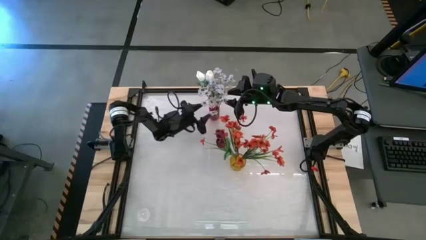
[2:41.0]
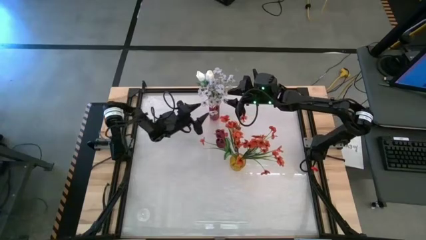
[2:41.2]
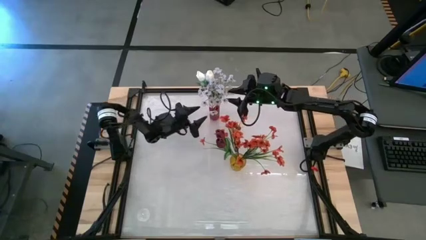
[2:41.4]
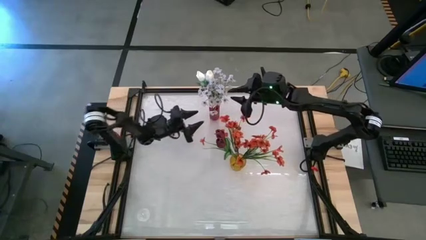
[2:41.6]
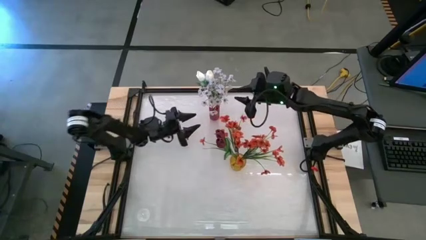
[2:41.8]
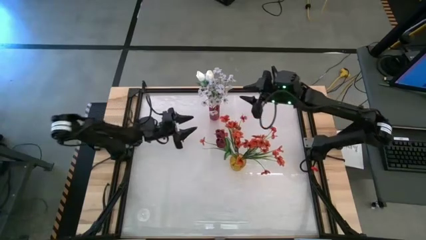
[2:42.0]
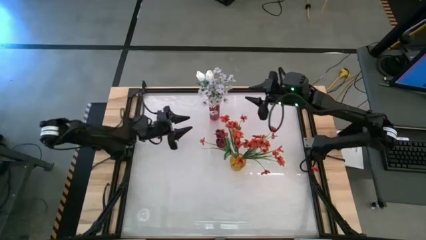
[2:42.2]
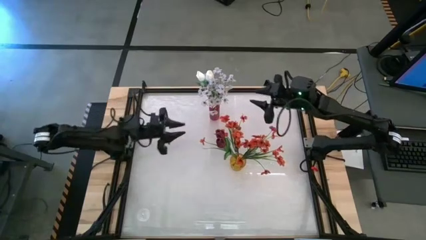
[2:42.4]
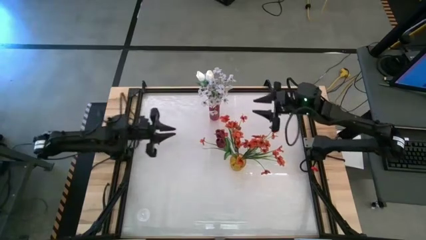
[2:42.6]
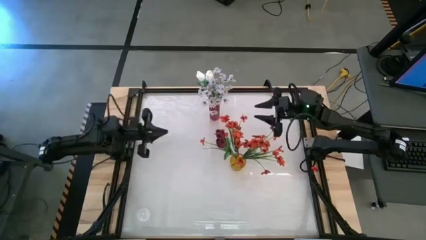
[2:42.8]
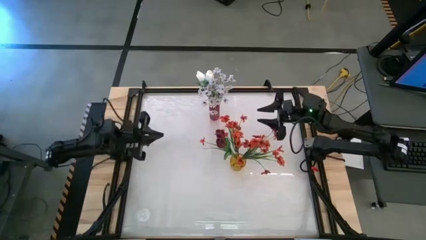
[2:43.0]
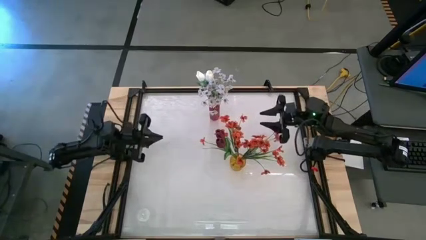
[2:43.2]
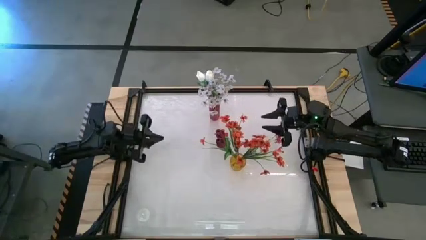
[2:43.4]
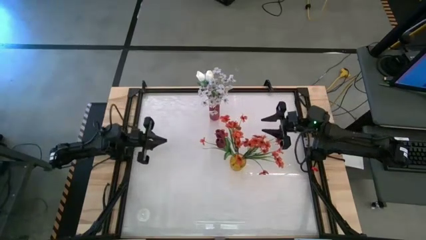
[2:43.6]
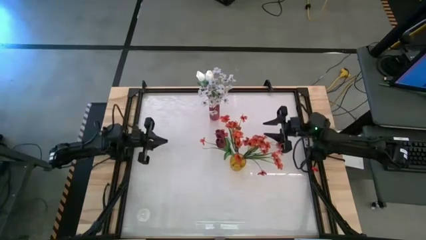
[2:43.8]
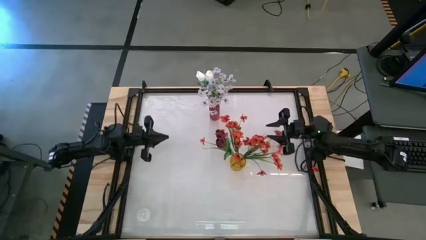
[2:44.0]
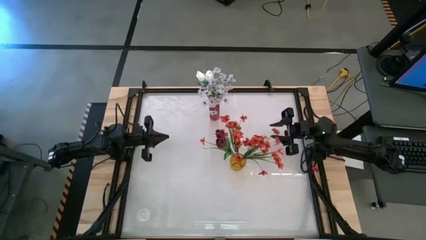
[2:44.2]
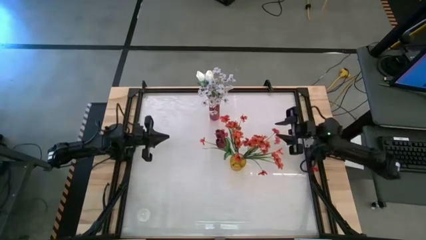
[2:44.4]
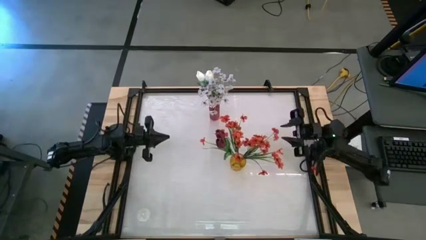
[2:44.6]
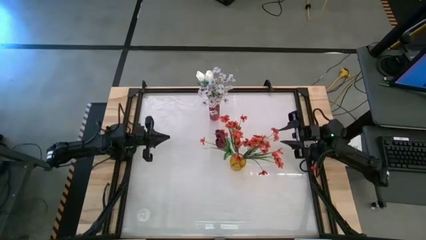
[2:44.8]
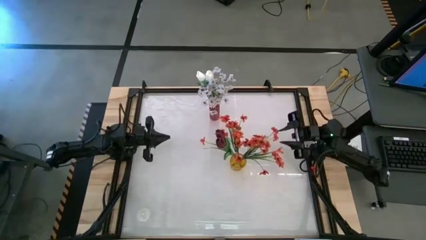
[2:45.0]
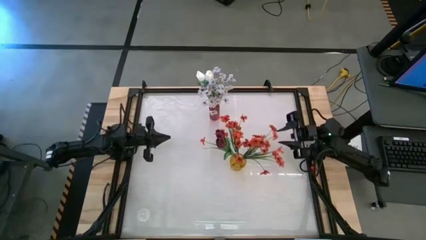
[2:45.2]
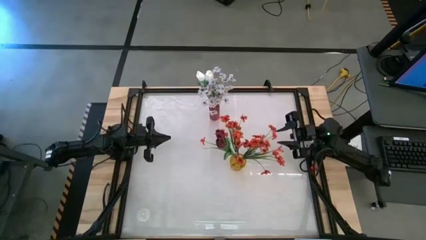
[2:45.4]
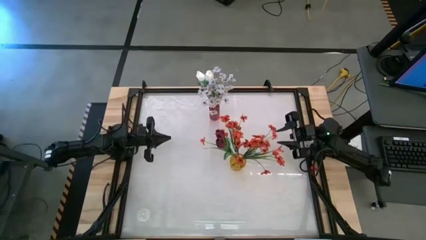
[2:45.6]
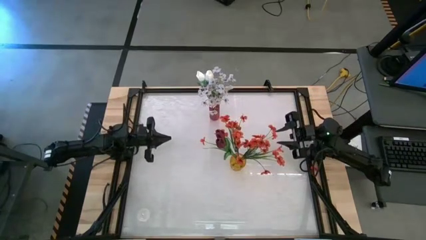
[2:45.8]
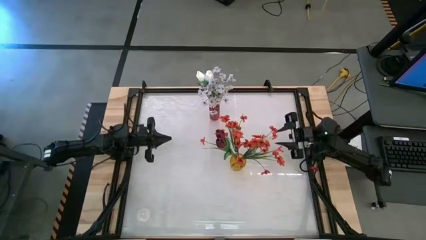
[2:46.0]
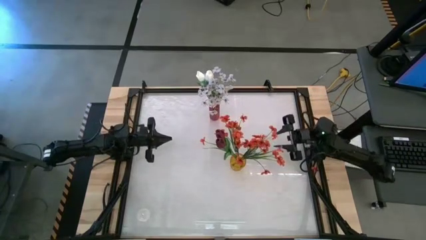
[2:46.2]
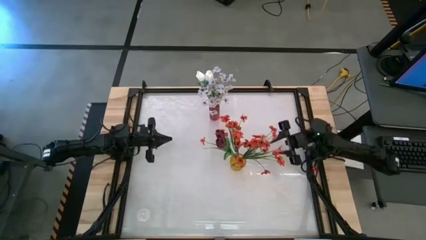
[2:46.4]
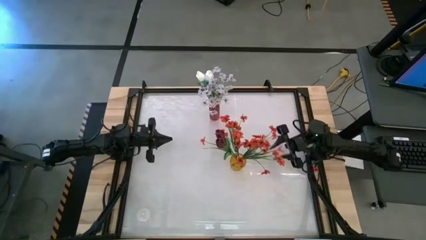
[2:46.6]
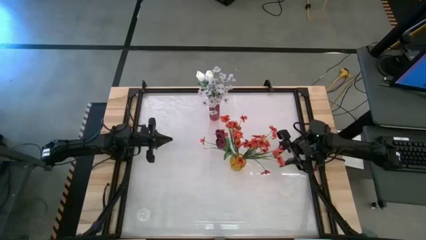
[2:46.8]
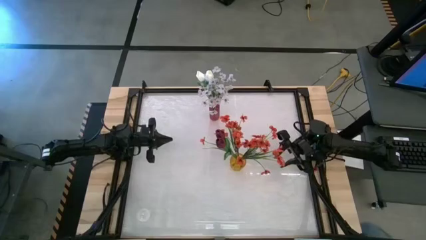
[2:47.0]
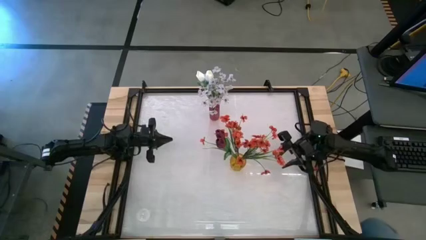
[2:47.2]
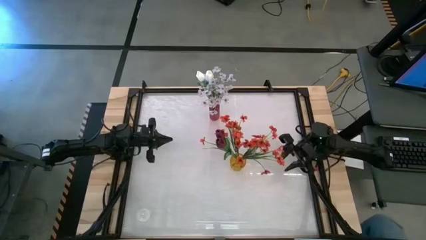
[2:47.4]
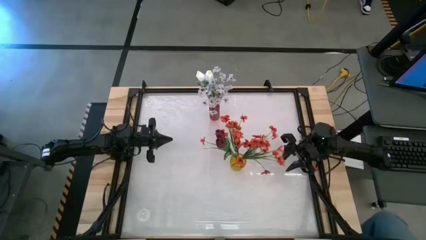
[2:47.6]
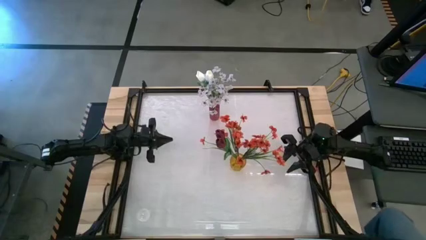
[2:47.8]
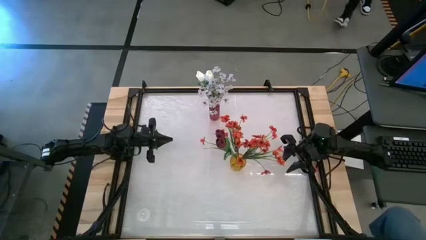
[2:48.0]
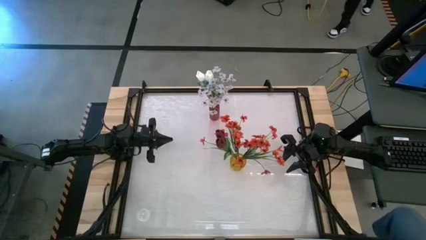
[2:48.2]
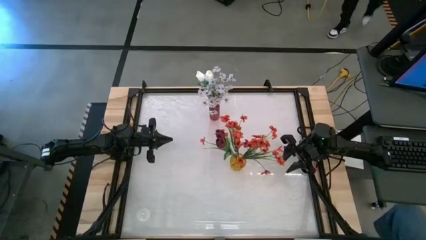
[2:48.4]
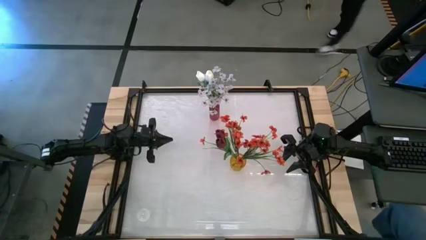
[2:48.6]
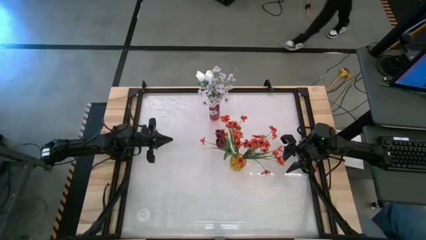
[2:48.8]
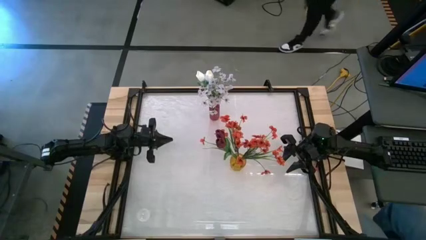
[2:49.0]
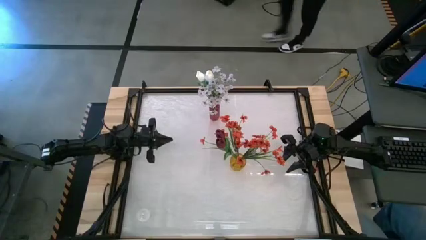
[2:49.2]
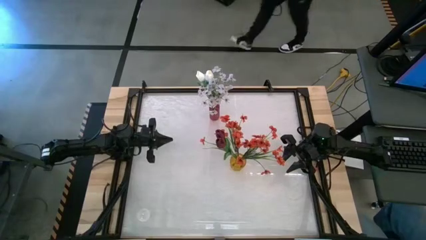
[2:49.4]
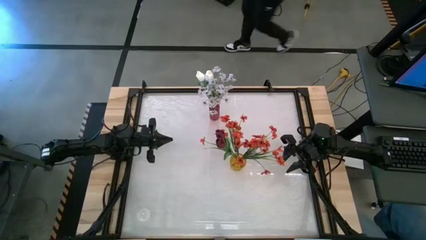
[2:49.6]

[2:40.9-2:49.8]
Task: Sort flowers into vase by color
Return to Home Position

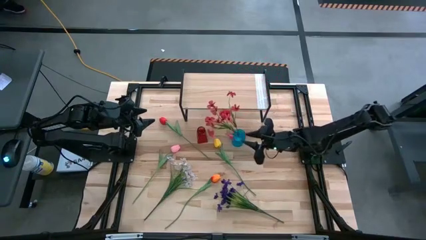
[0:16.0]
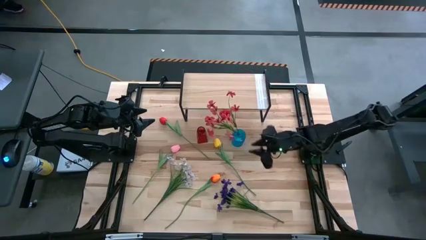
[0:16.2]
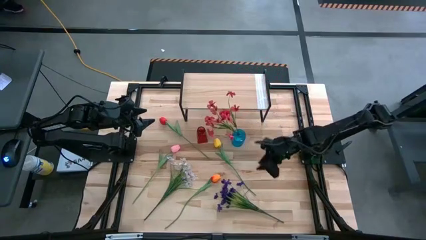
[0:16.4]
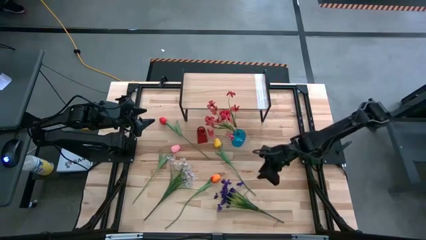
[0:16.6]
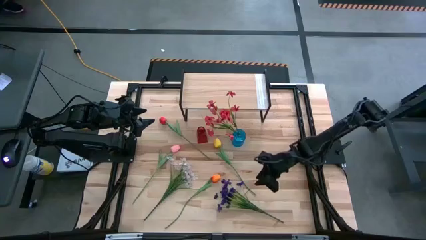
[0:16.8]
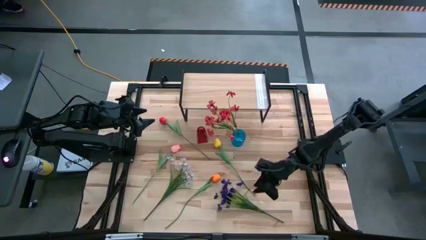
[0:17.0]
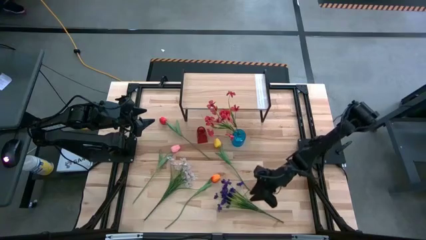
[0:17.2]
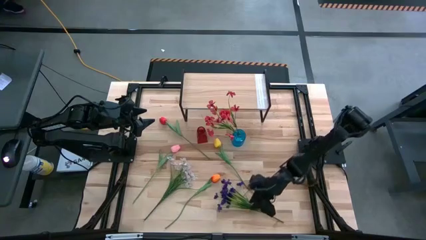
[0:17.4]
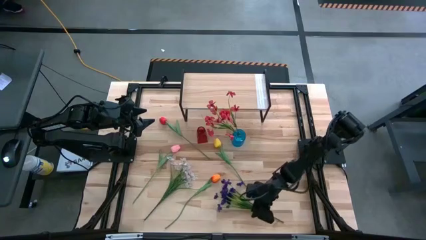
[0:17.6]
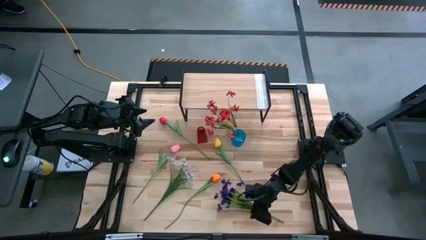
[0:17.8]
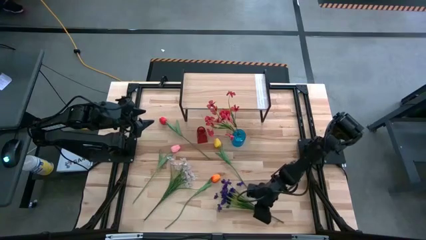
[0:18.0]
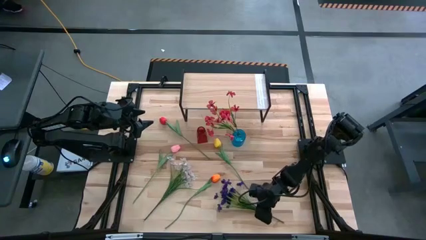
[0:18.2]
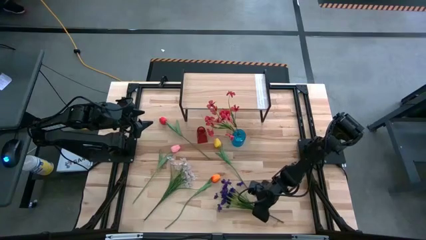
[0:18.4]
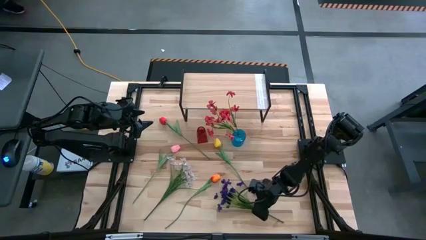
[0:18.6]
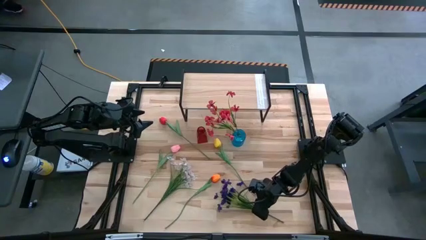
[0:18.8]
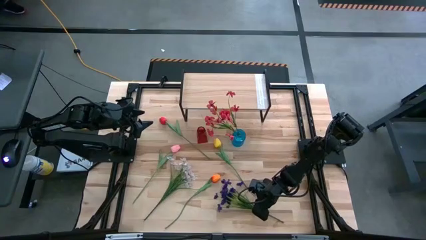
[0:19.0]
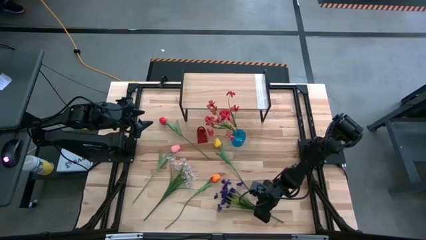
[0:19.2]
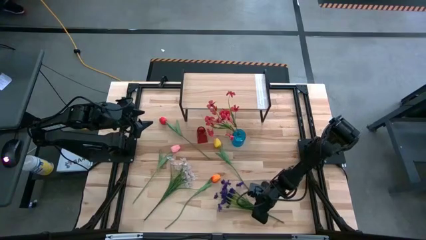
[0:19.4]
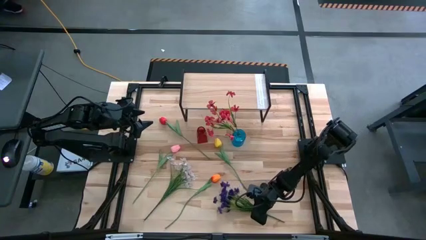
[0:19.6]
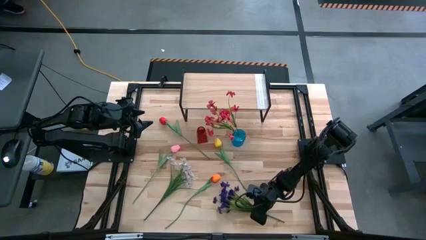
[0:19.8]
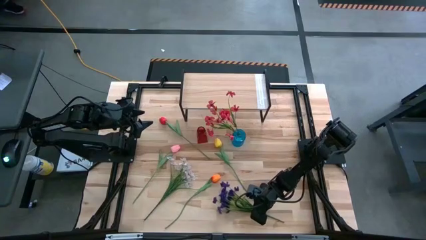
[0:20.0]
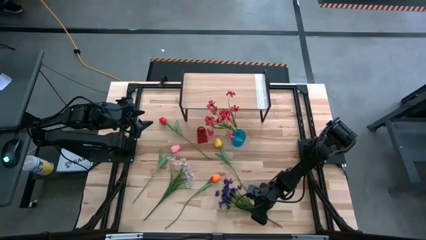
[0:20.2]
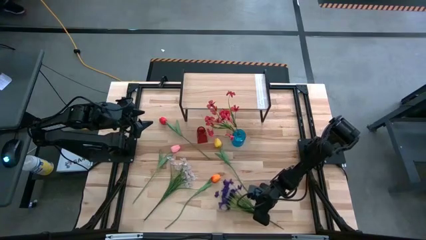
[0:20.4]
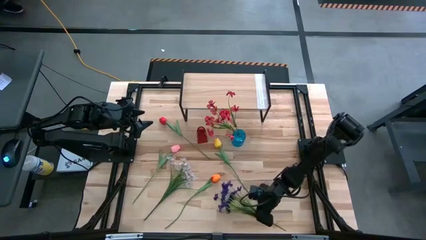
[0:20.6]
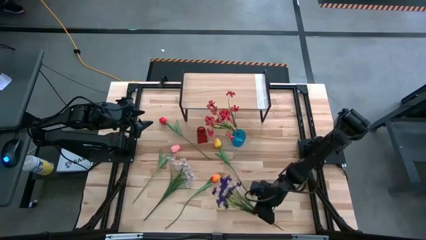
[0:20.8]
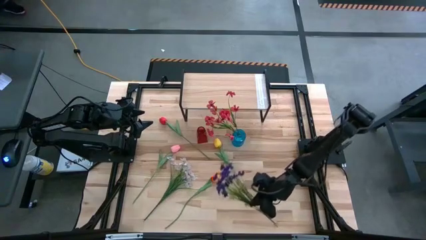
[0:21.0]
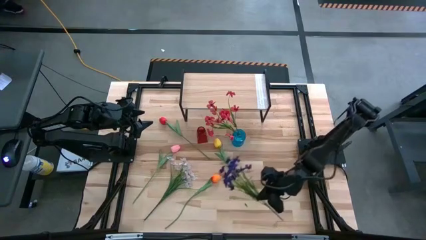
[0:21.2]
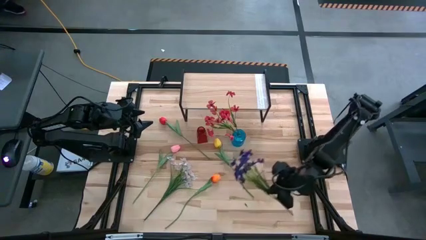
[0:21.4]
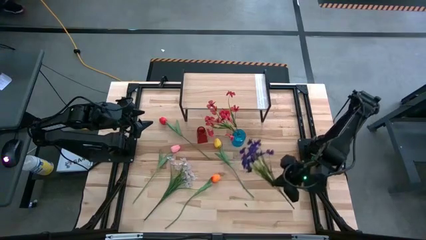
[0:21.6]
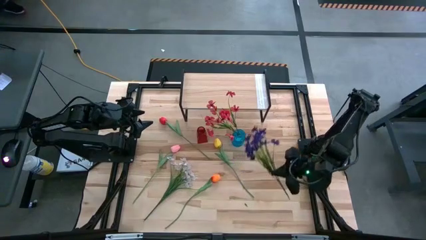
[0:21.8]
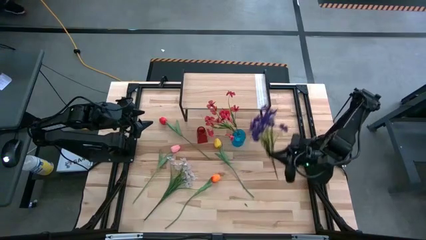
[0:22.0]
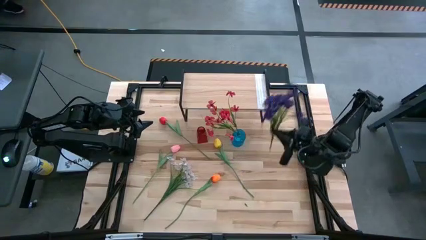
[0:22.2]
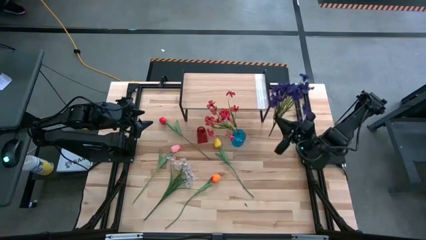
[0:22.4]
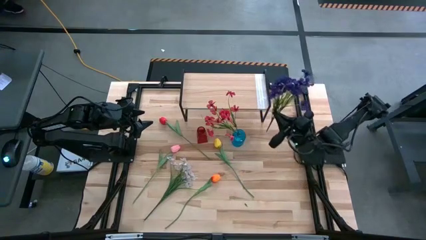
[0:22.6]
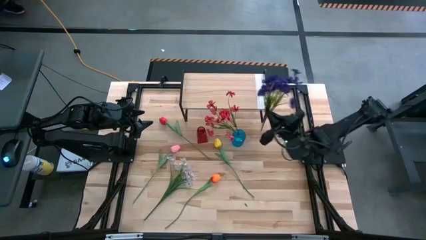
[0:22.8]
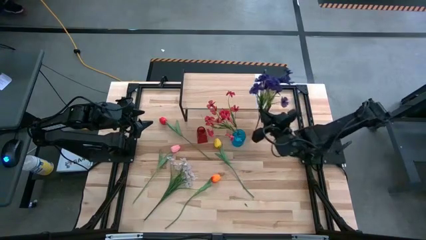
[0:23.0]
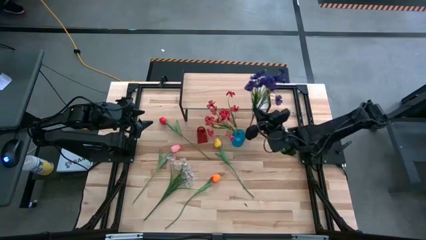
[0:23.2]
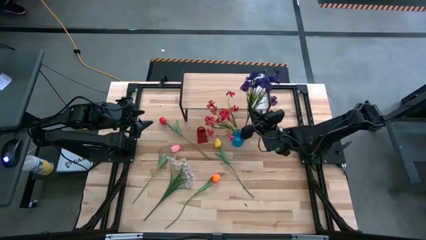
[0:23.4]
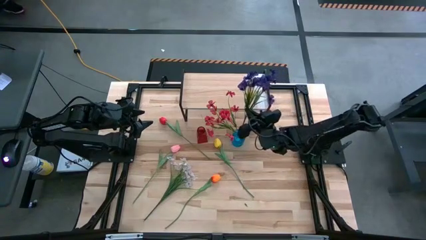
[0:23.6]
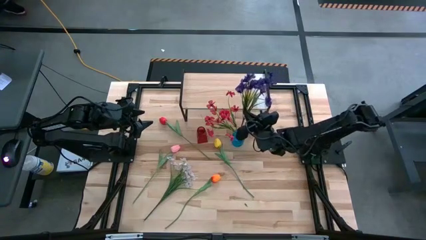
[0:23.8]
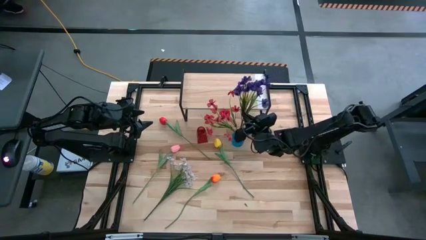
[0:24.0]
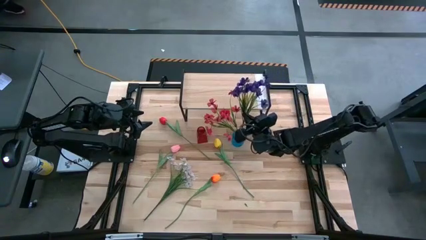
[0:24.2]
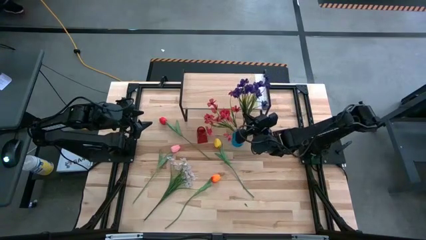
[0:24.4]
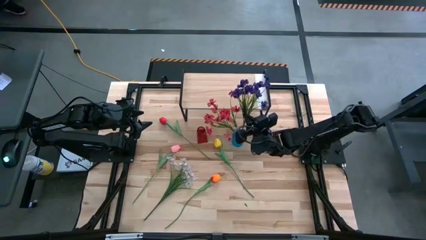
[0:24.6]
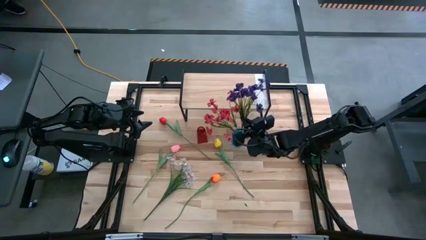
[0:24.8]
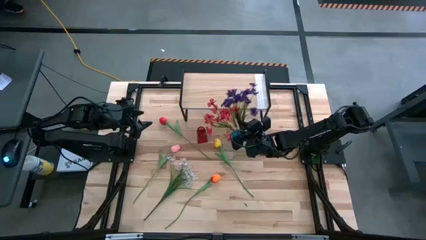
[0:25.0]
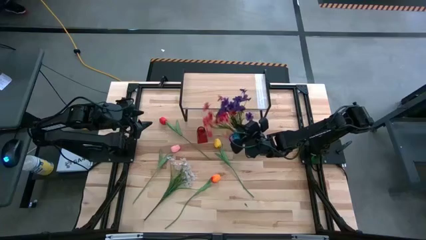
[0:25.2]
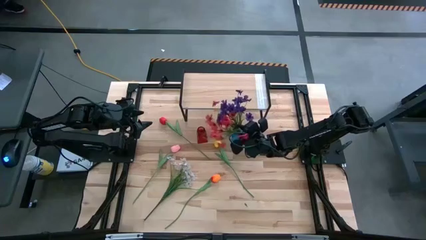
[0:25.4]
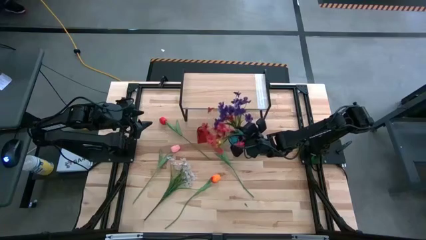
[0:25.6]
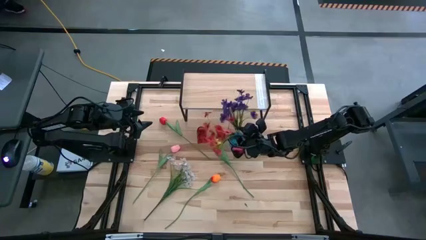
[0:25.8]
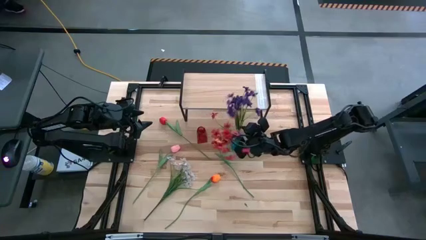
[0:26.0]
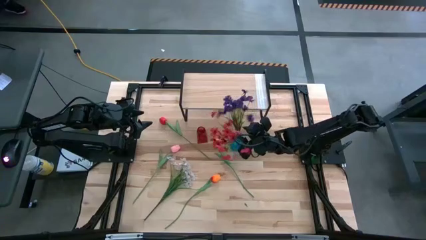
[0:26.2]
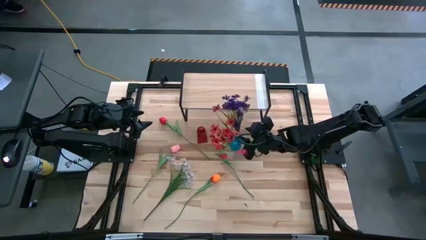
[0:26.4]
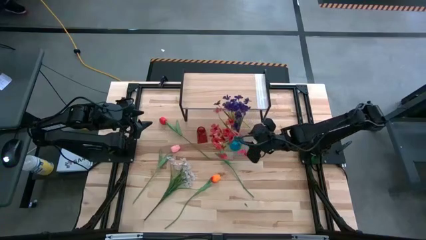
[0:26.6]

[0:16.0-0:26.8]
Task: Pick and place flowers into a vace then onto a shelf
Put the purple flowers into the blue vase
